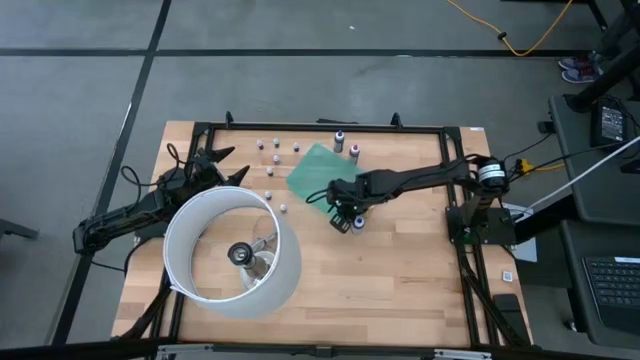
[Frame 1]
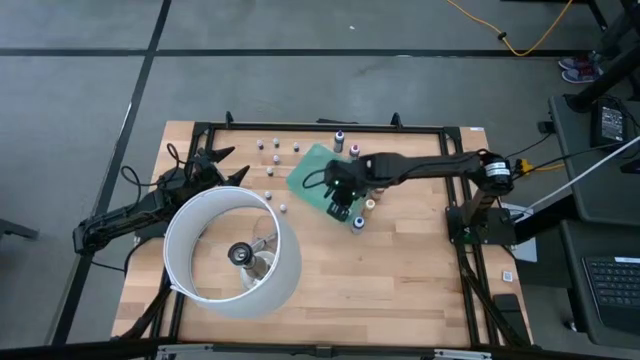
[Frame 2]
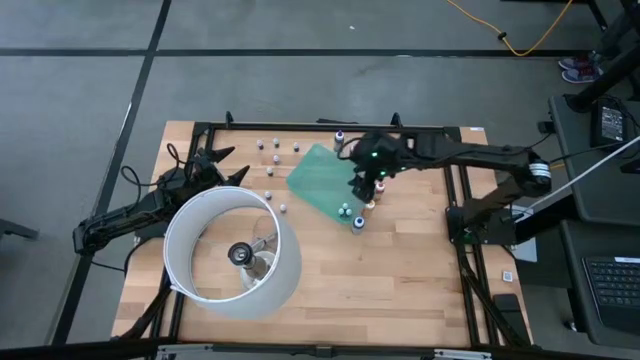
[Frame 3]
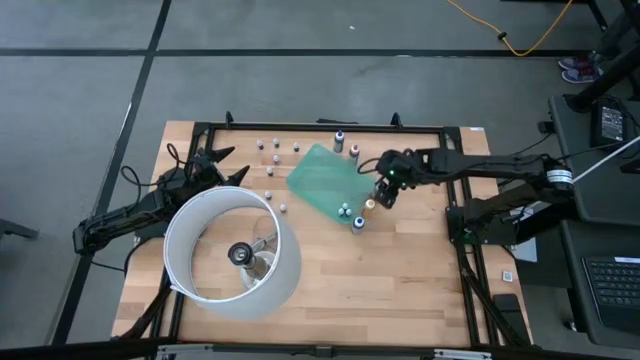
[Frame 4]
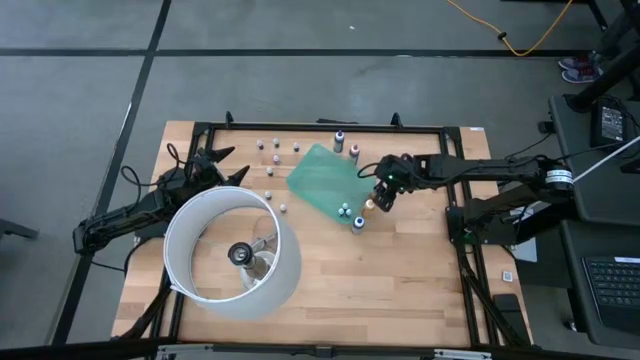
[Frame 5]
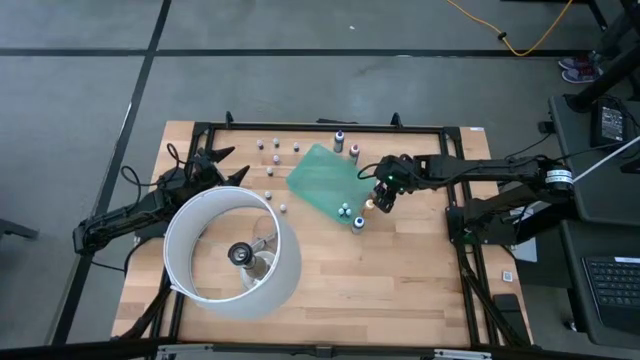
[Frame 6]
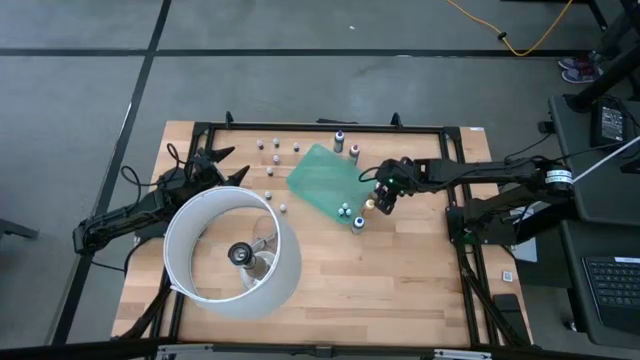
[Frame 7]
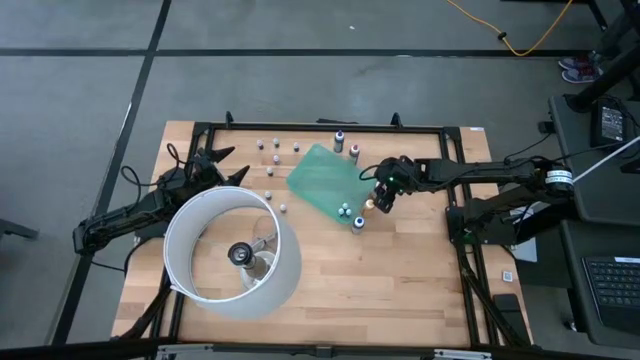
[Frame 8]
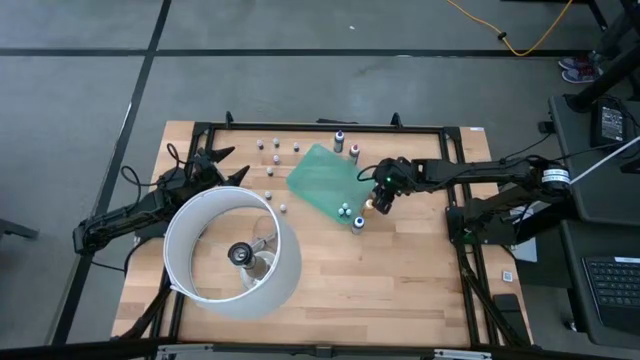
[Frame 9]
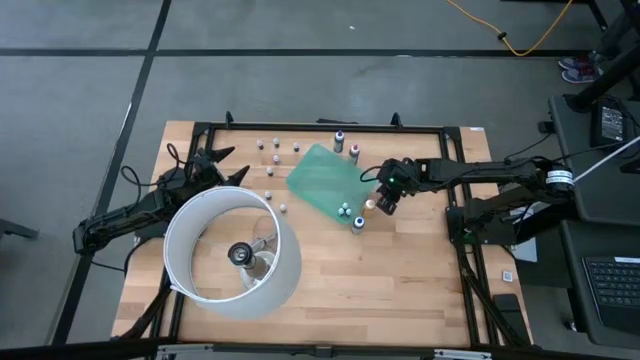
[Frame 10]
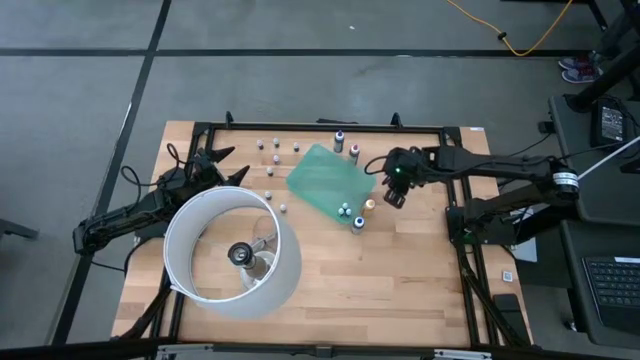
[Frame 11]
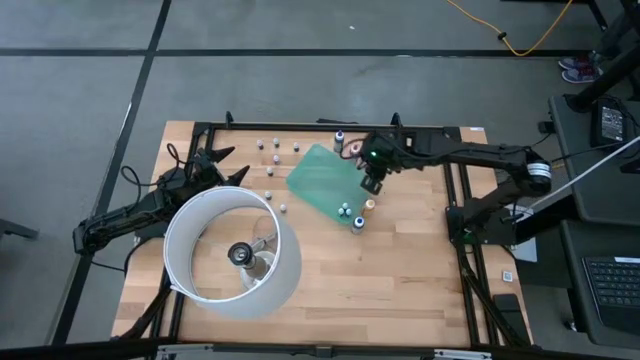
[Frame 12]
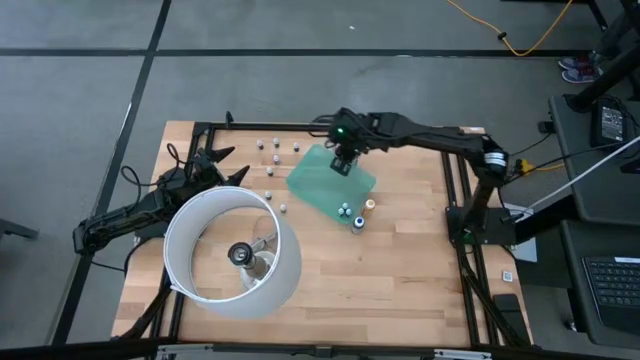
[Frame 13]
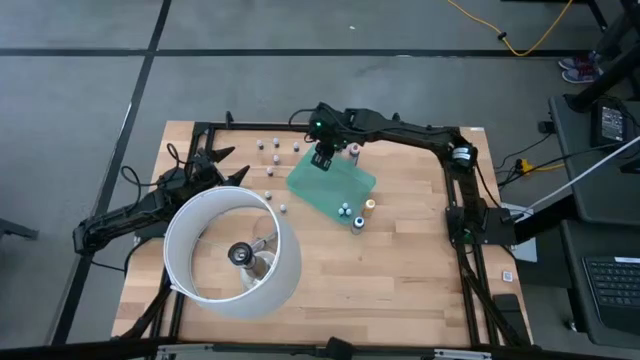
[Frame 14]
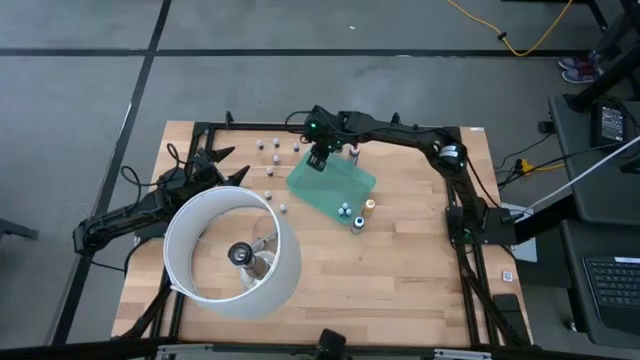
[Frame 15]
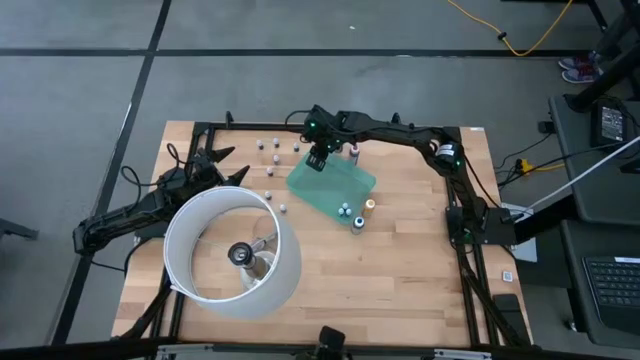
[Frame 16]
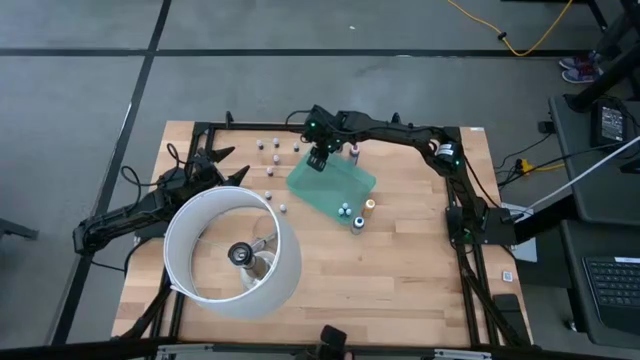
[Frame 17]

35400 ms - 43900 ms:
Task: Pick & Place food coloring
Put the large orange food coloring bottle into the green bin

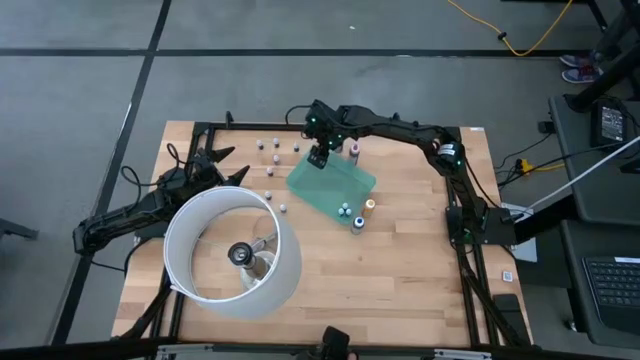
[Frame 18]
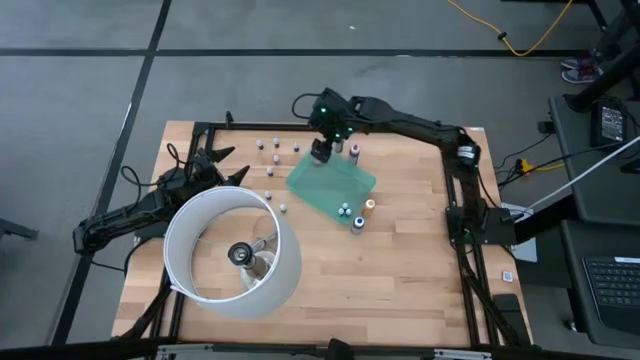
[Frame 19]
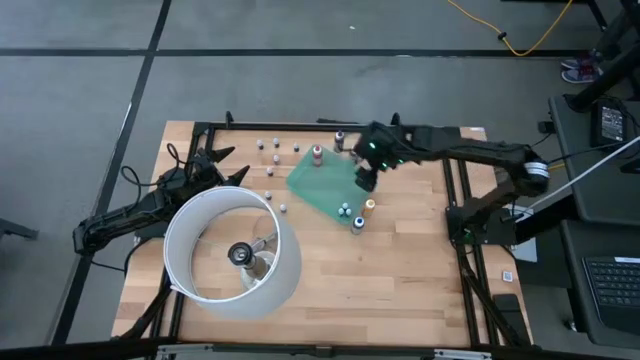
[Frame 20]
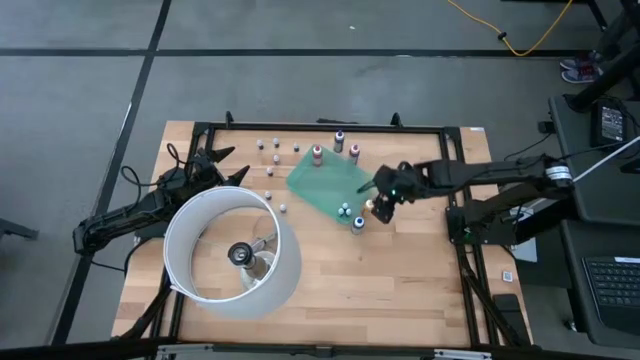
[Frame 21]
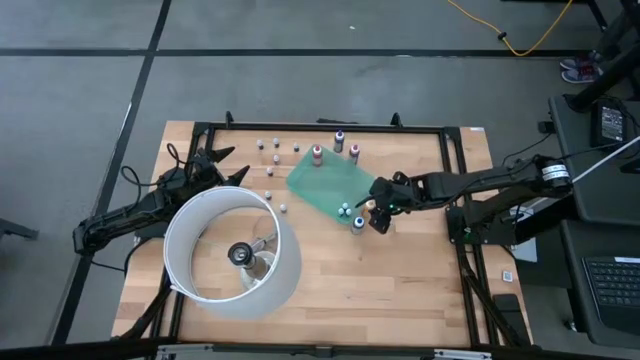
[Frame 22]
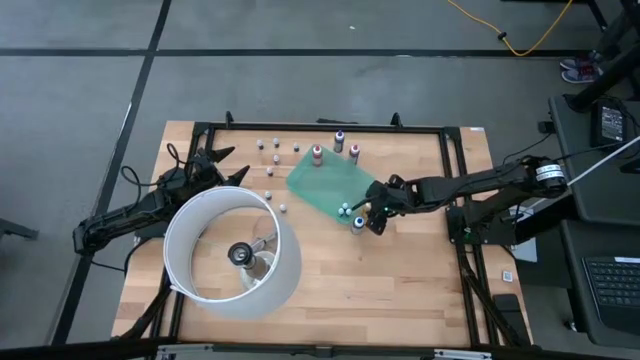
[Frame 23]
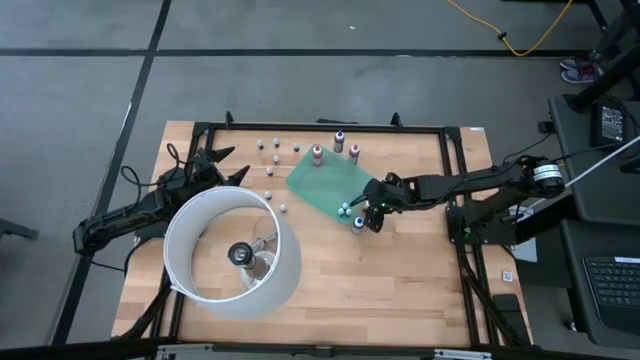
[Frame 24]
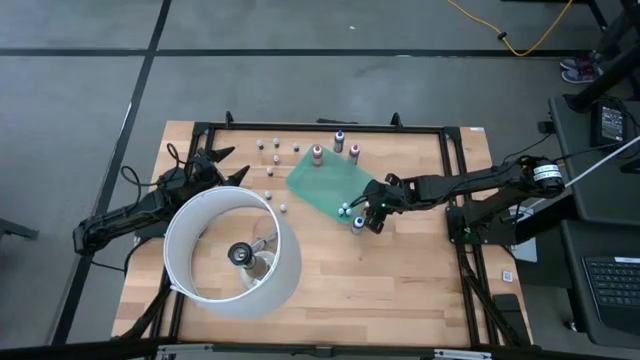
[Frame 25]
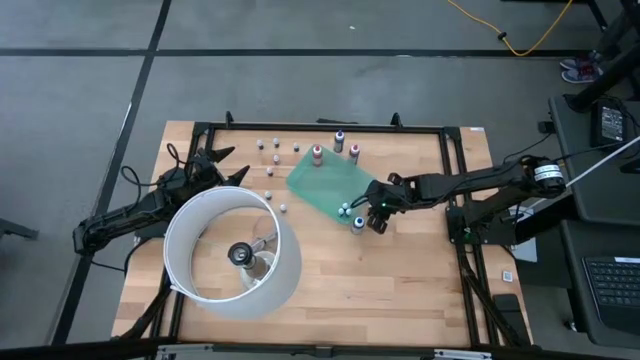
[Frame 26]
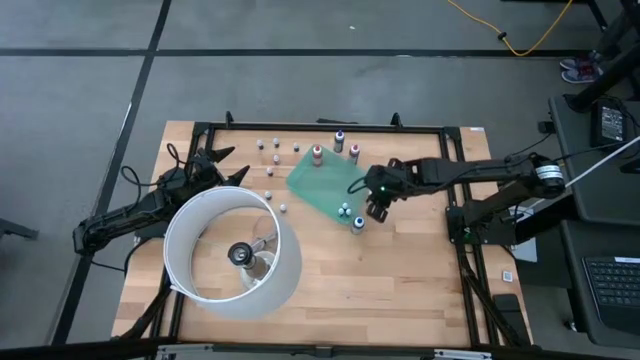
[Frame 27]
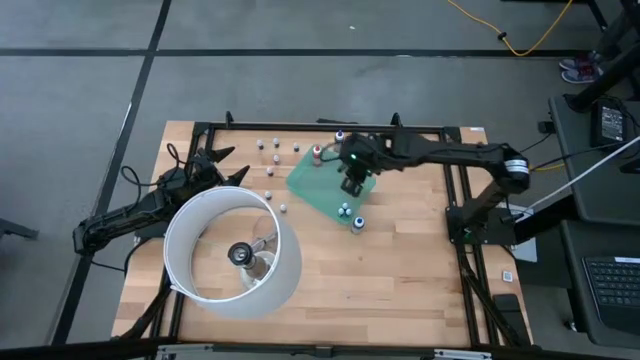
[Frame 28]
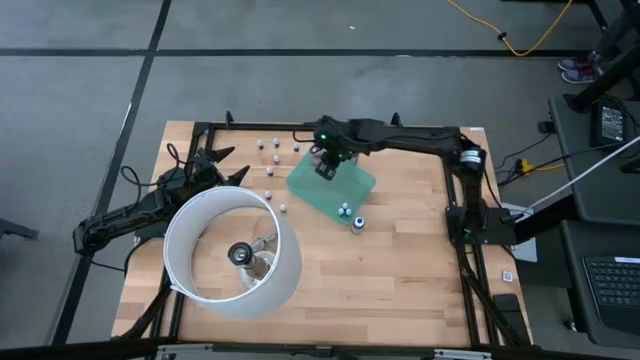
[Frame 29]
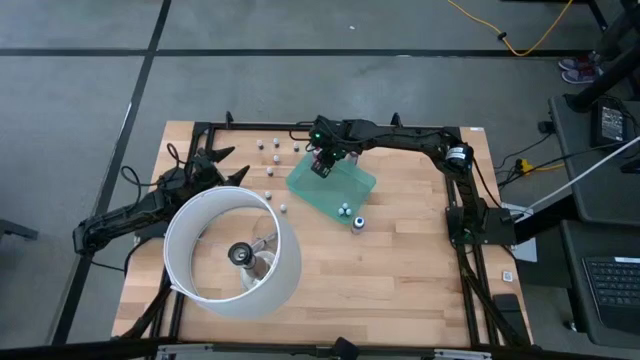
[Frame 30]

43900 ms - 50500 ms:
Put the large yellow food coloring bottle into the green bin

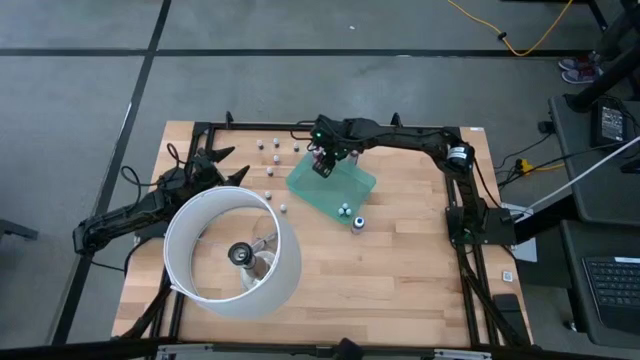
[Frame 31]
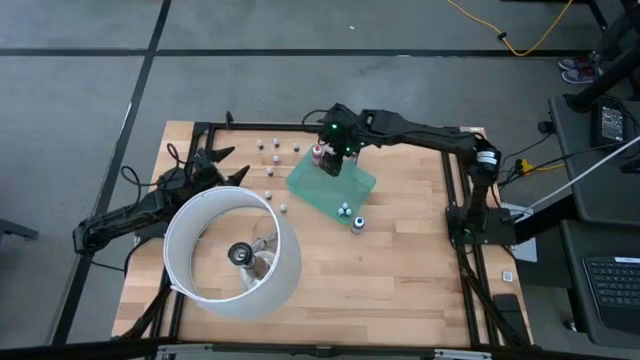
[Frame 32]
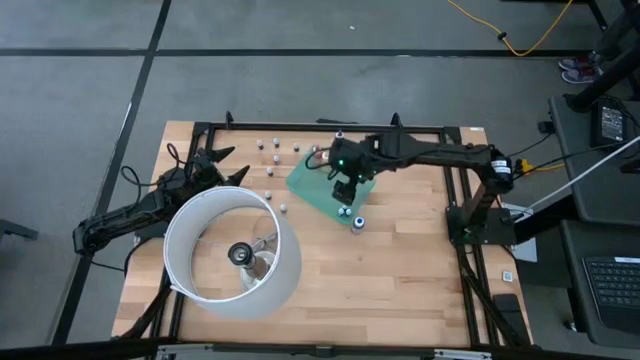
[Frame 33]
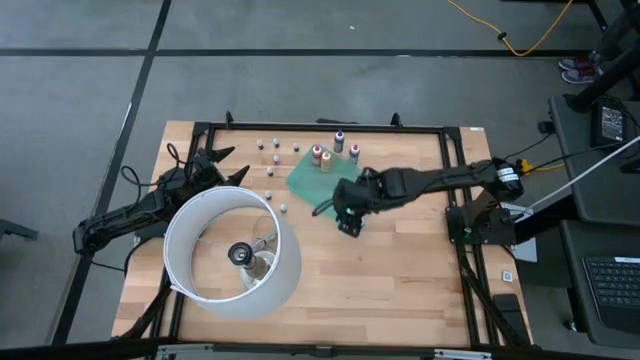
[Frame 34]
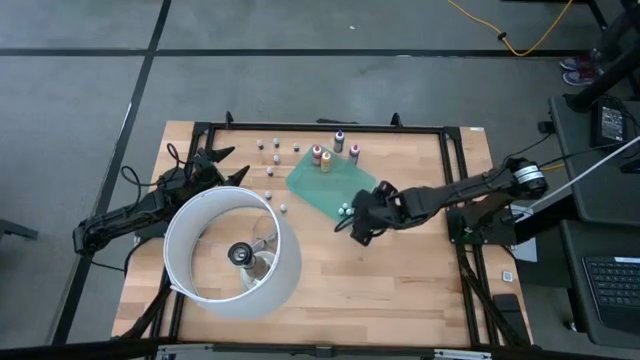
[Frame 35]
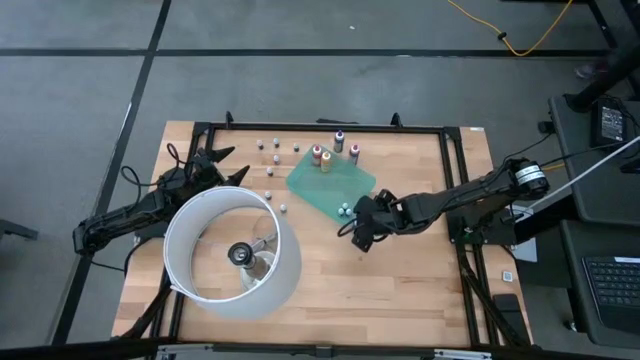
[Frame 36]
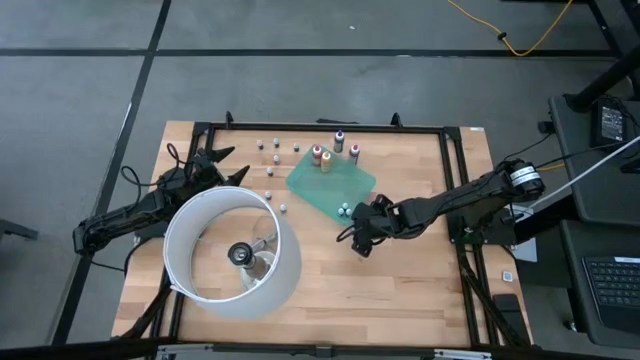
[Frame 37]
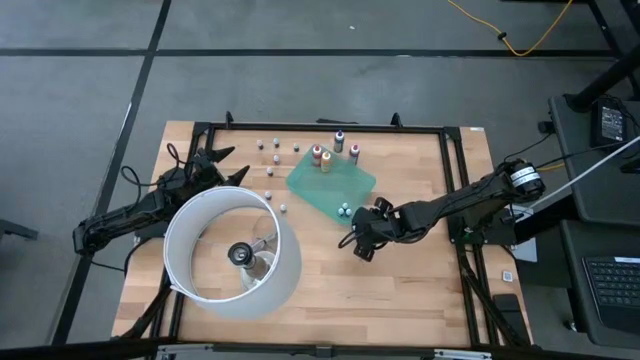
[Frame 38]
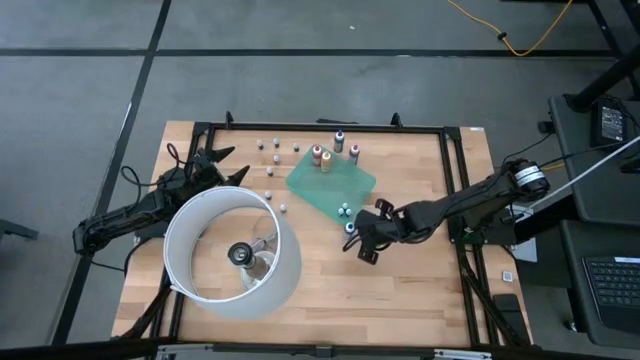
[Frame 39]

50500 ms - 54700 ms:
Put the large blue food coloring bottle into the green bin

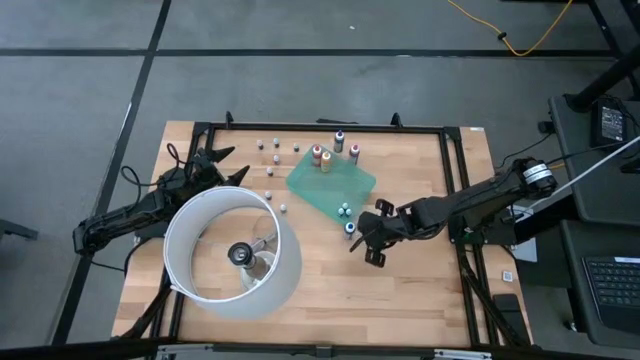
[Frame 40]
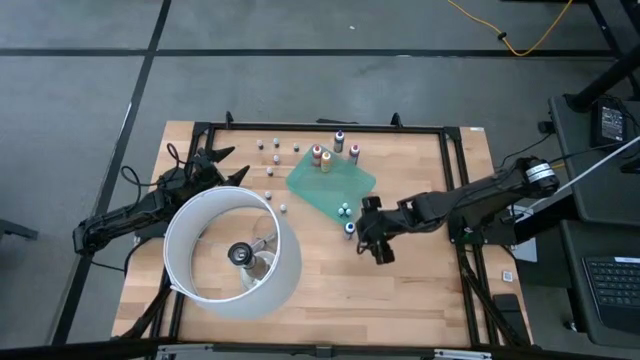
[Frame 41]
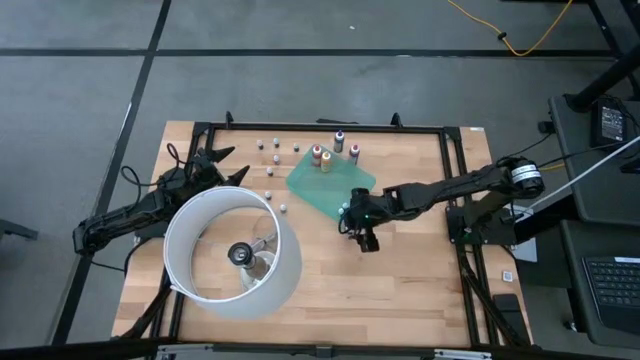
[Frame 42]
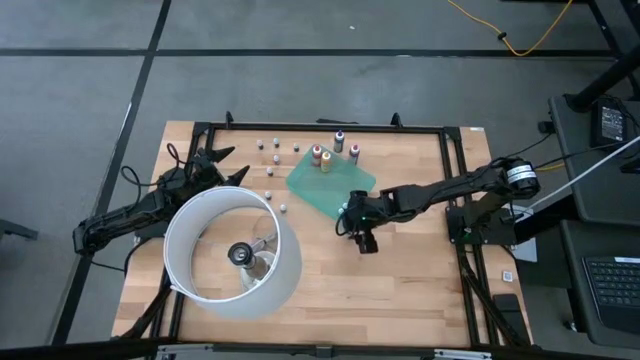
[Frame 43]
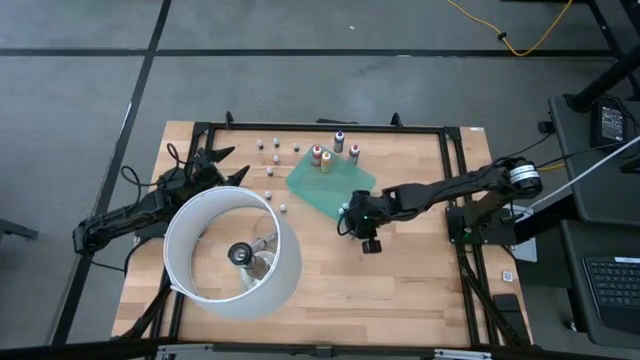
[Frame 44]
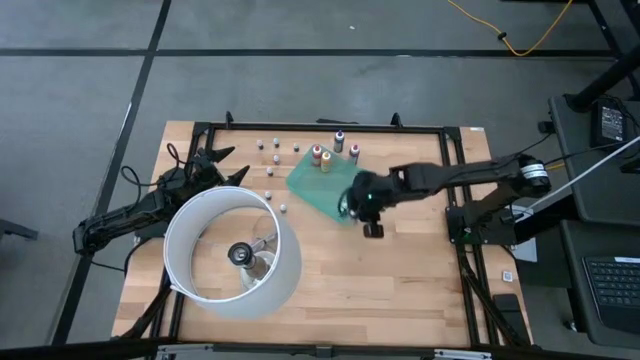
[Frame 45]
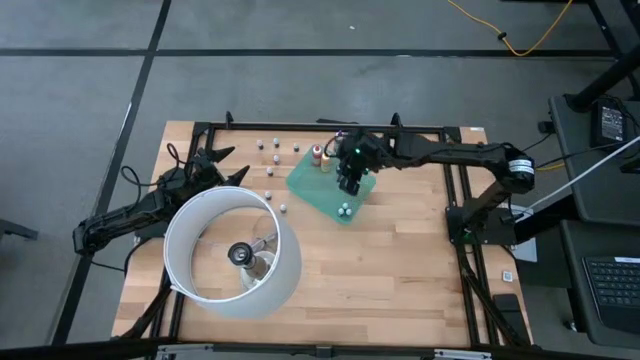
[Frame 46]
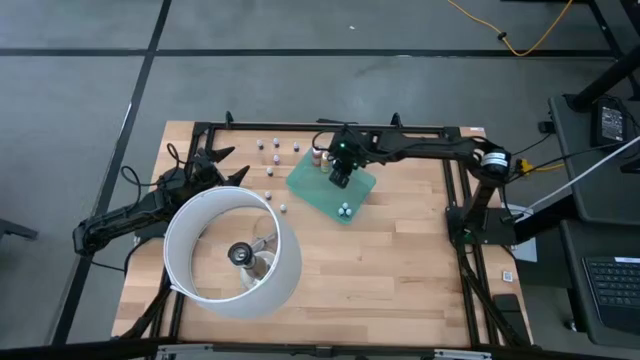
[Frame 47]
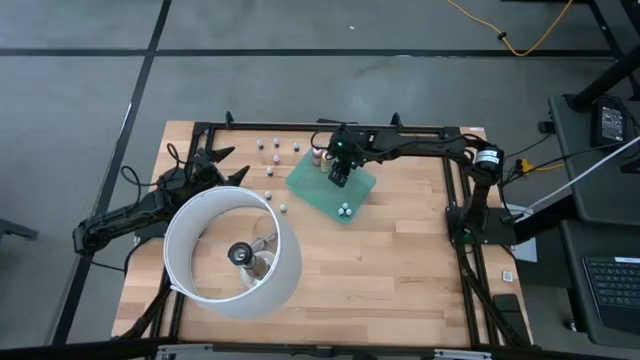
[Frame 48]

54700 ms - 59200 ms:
Put the large blue food coloring bottle into the green bin
